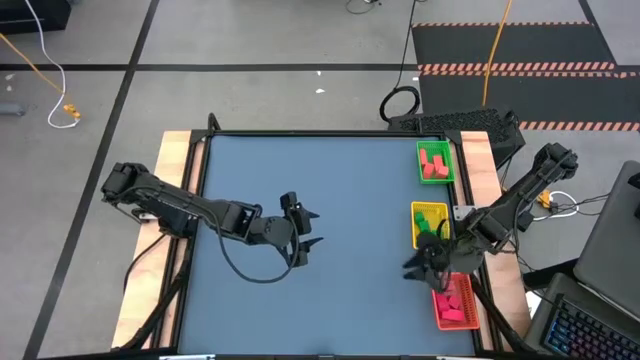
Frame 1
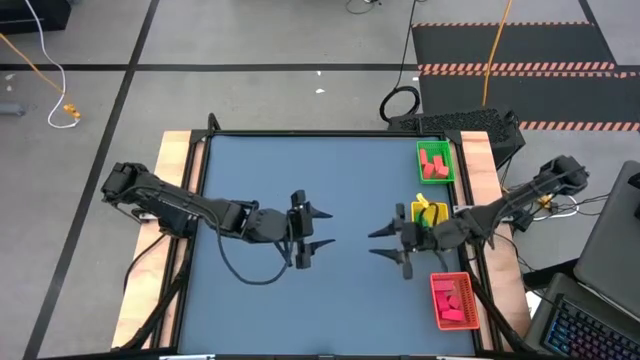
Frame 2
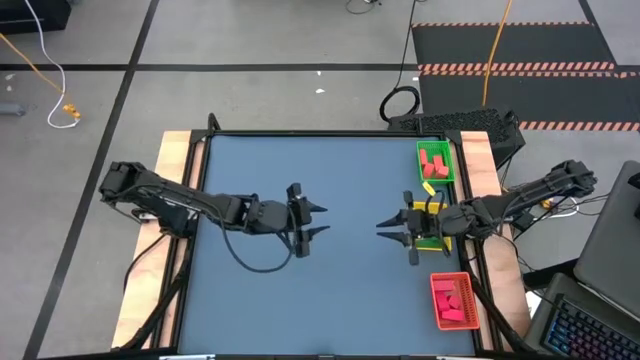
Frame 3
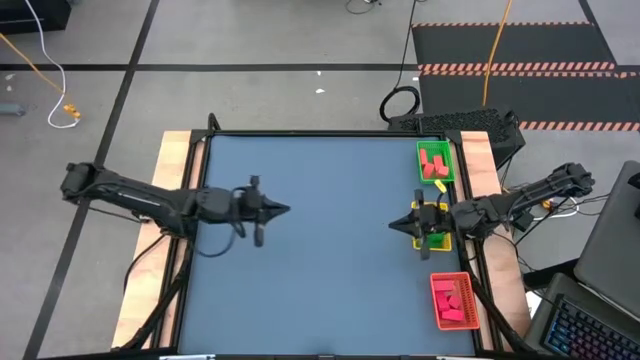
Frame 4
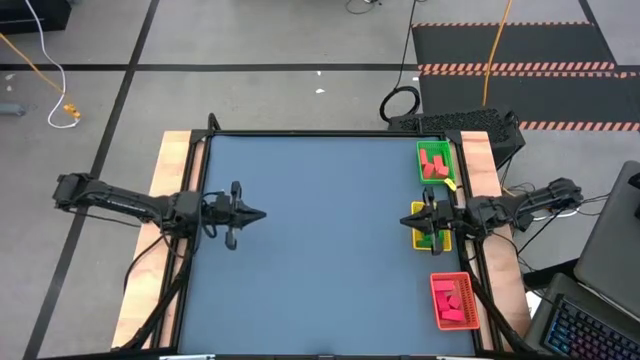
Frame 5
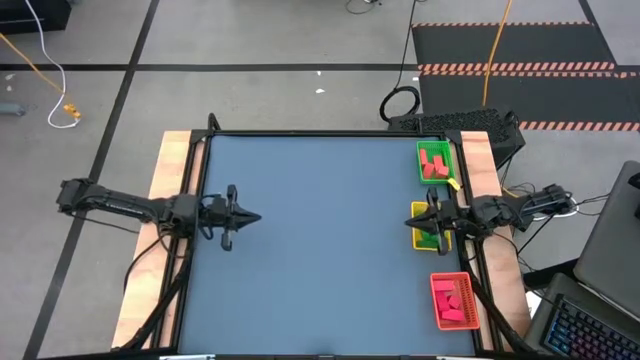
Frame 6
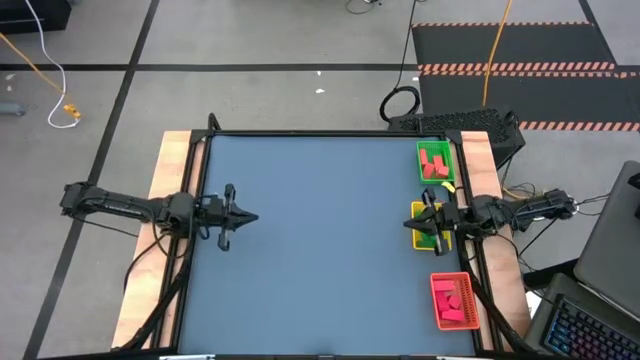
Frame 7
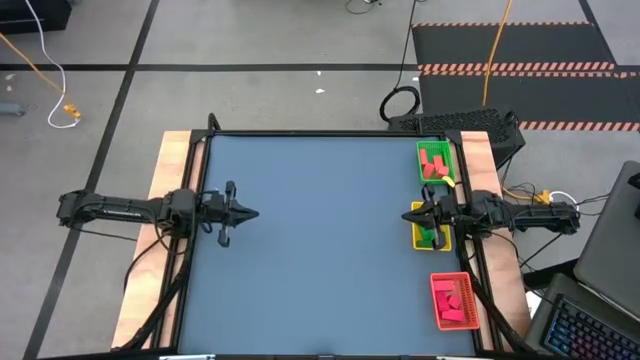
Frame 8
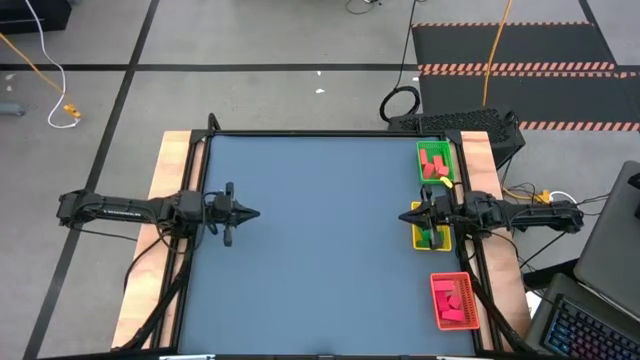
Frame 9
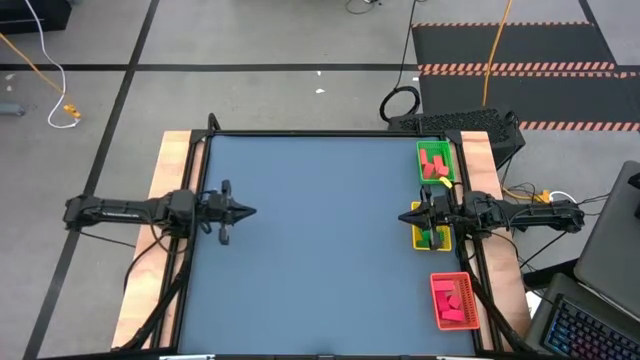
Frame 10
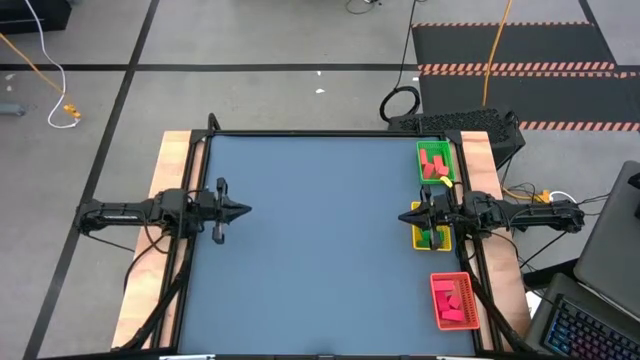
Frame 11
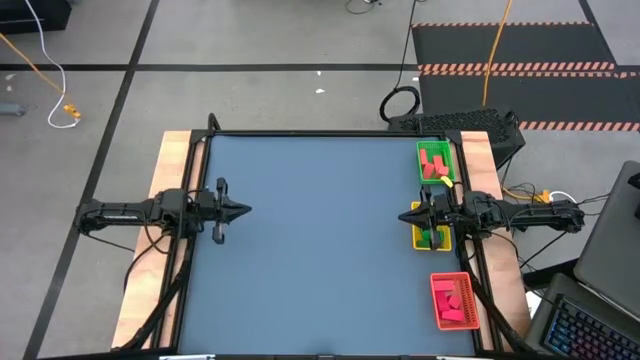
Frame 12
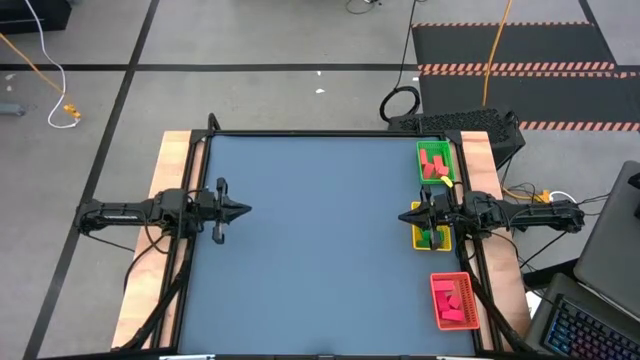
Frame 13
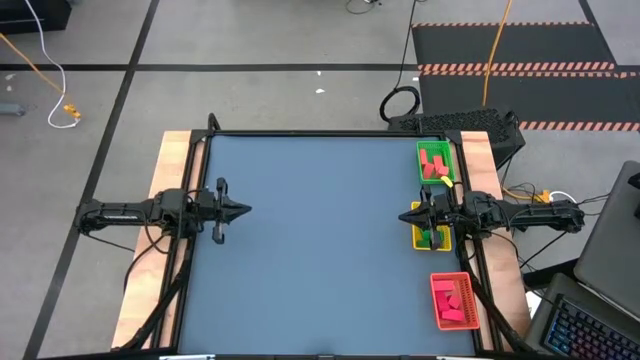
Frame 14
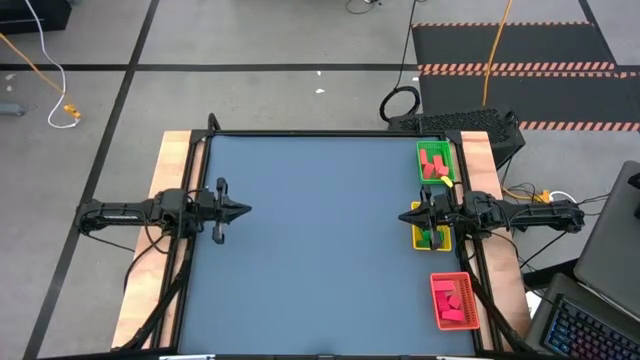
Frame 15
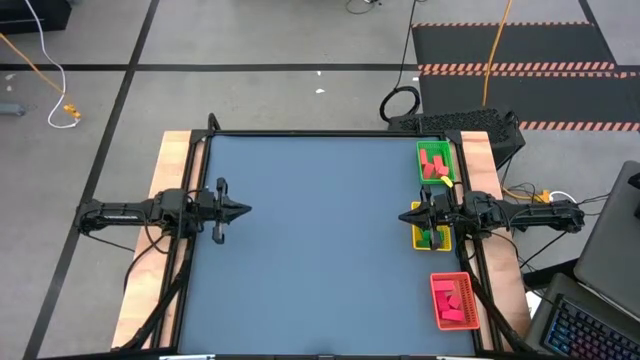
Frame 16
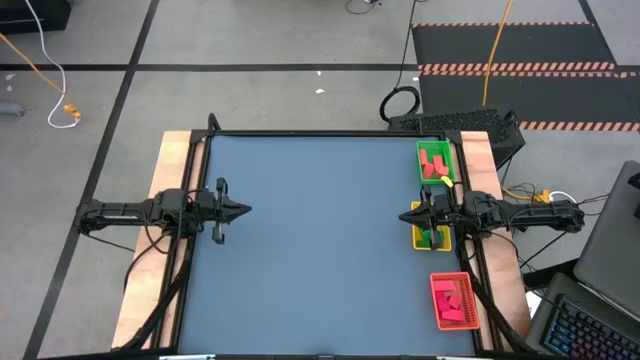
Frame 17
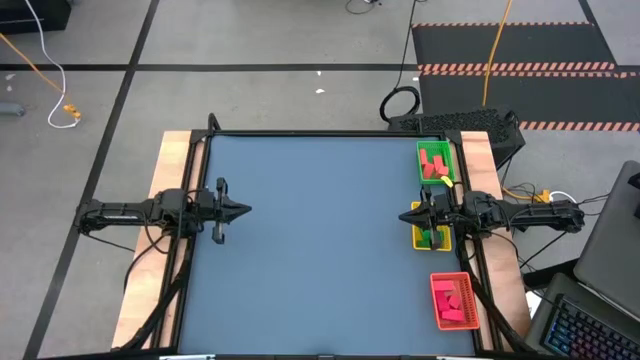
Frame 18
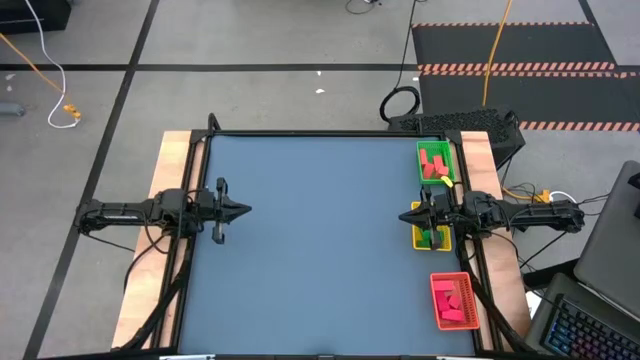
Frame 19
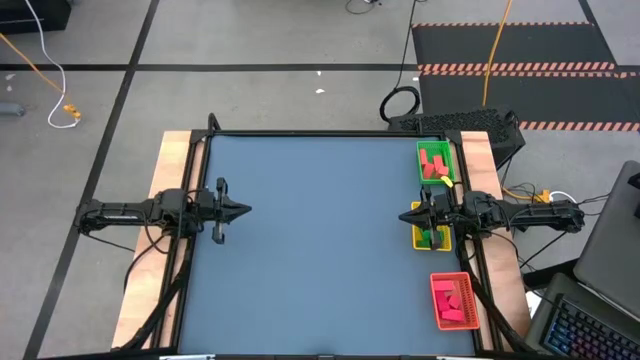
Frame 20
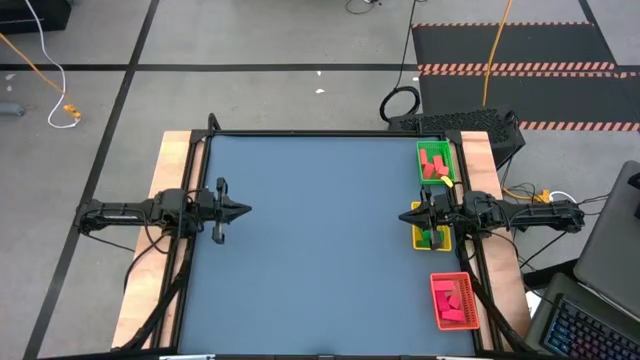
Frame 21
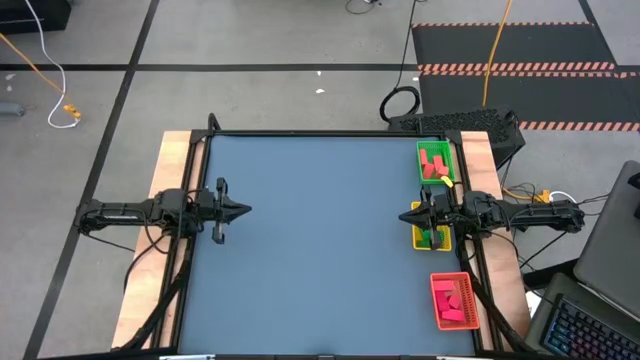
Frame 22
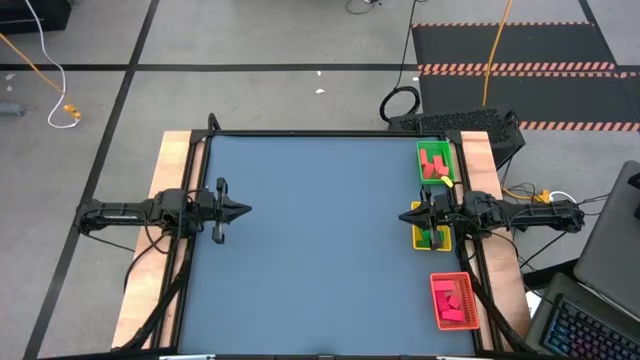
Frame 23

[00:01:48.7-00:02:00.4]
Task: Sort & place blocks by color
Return to Home Position

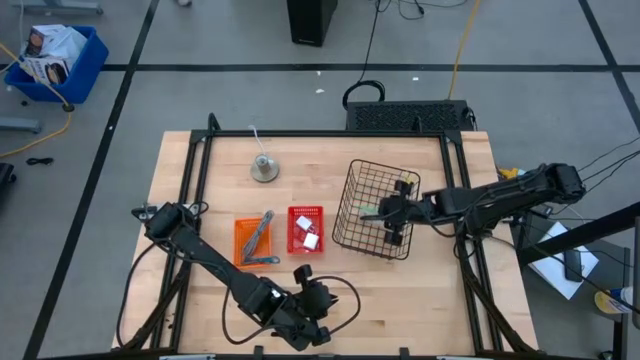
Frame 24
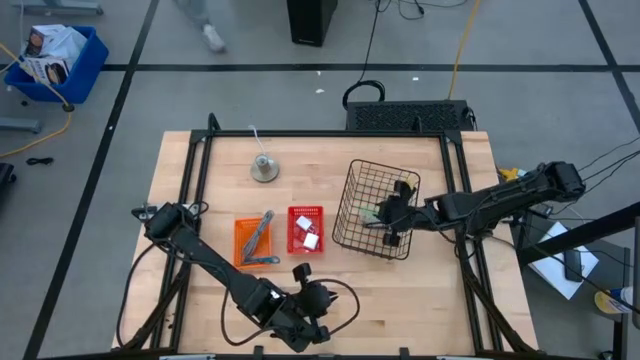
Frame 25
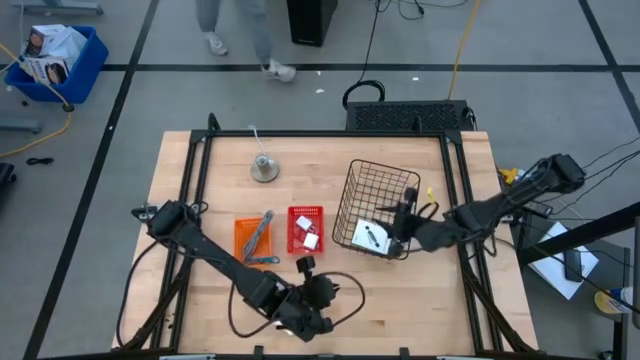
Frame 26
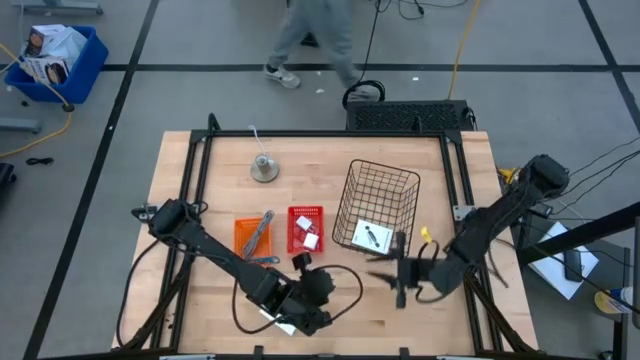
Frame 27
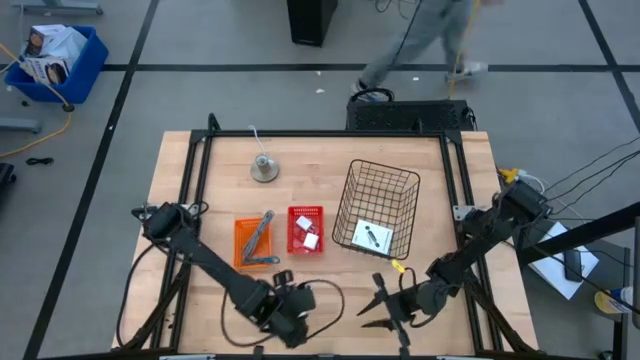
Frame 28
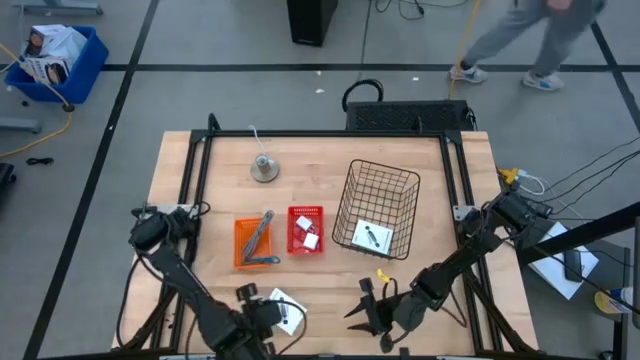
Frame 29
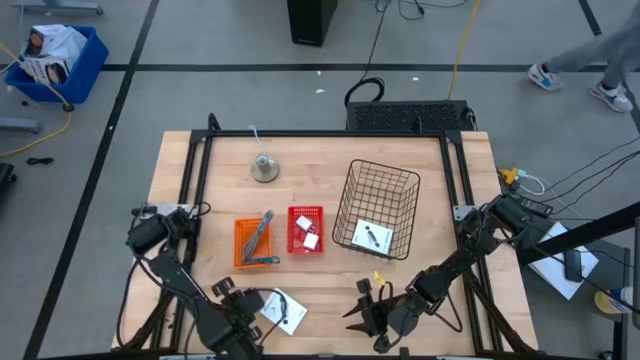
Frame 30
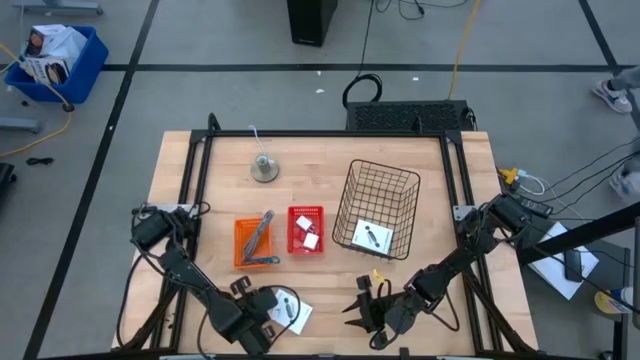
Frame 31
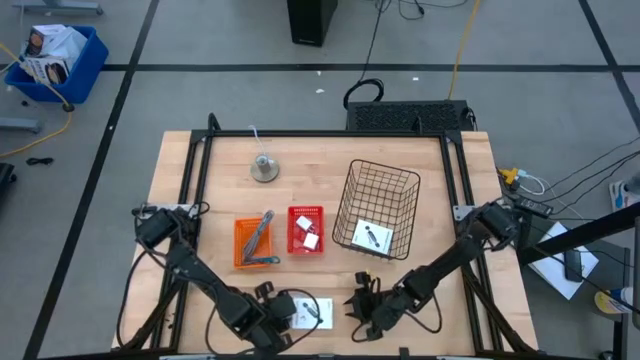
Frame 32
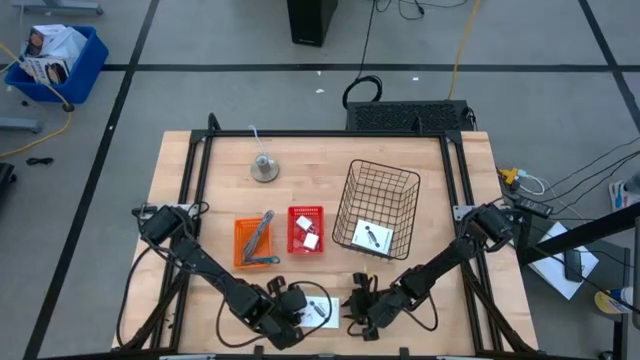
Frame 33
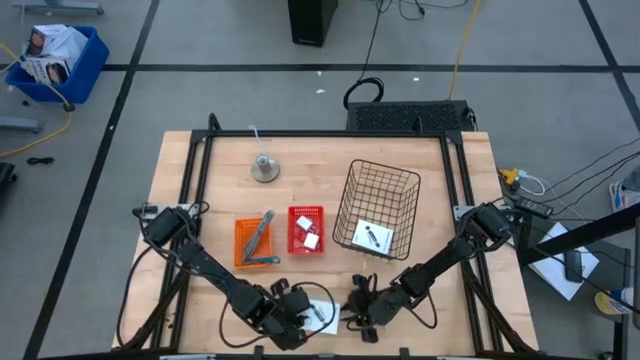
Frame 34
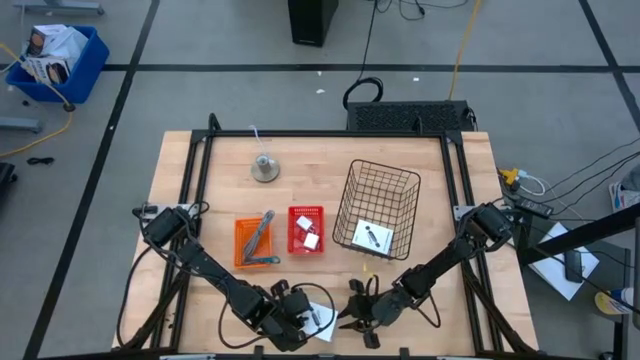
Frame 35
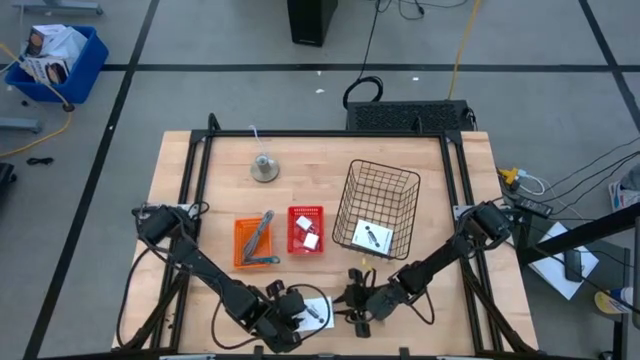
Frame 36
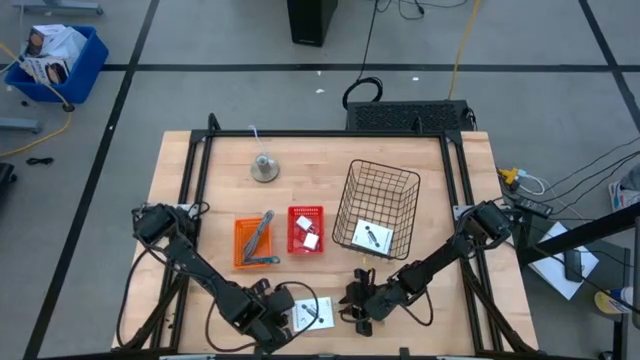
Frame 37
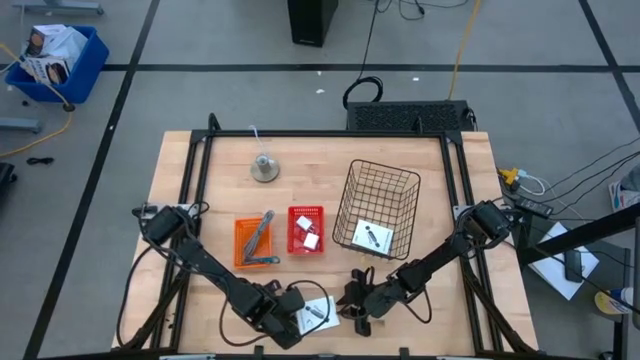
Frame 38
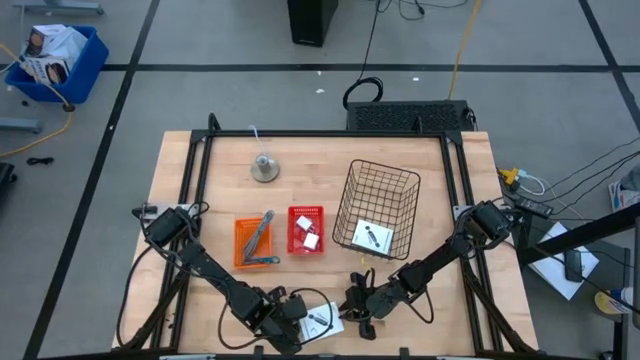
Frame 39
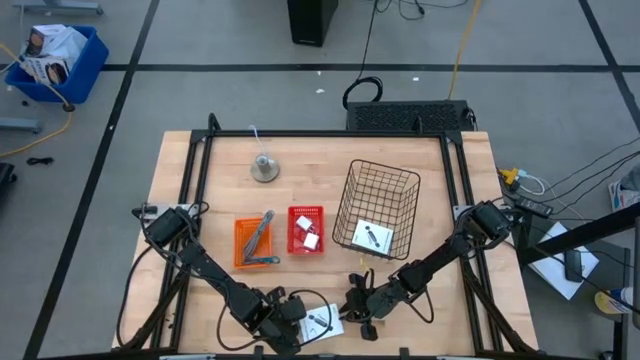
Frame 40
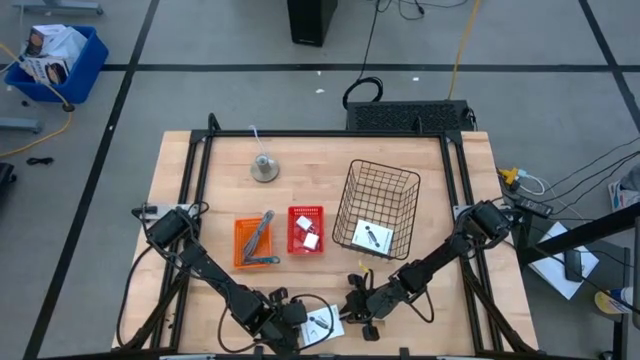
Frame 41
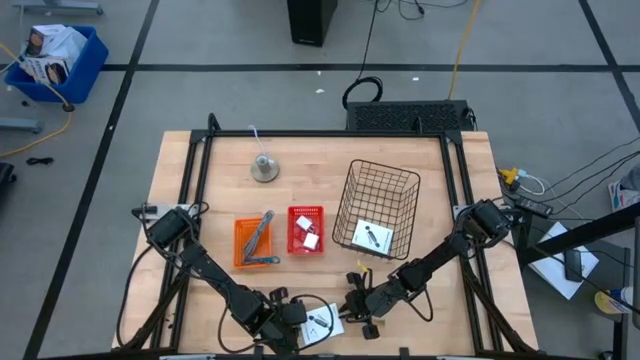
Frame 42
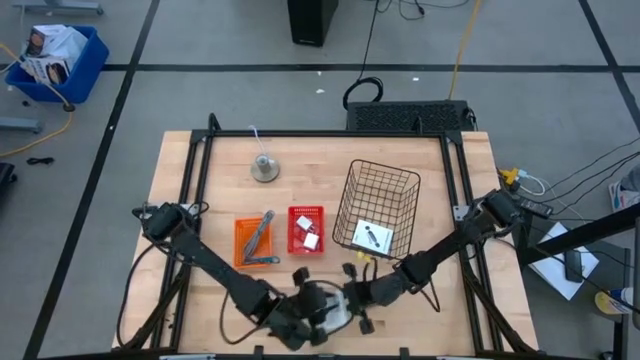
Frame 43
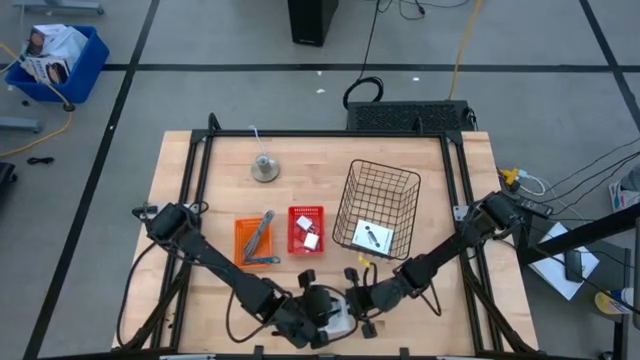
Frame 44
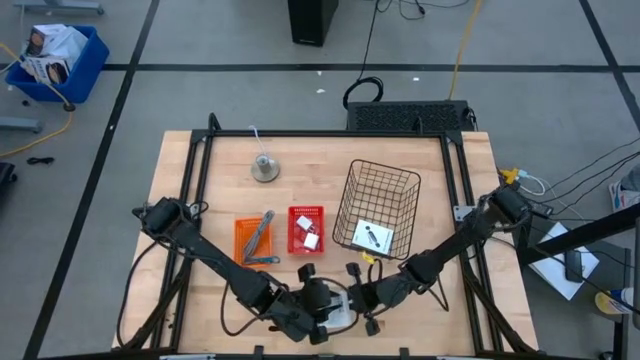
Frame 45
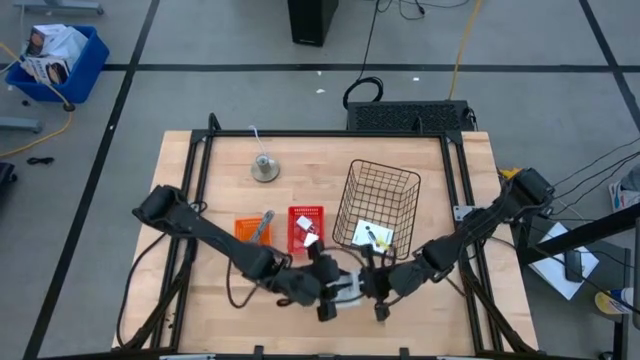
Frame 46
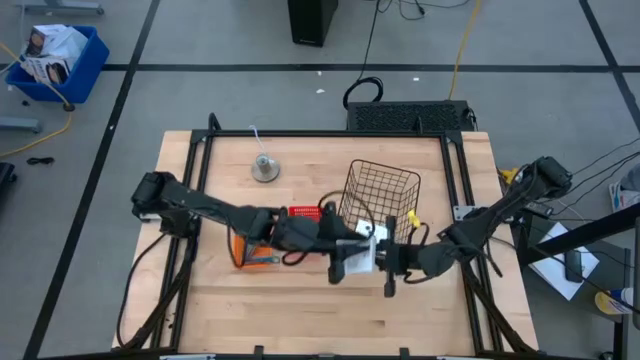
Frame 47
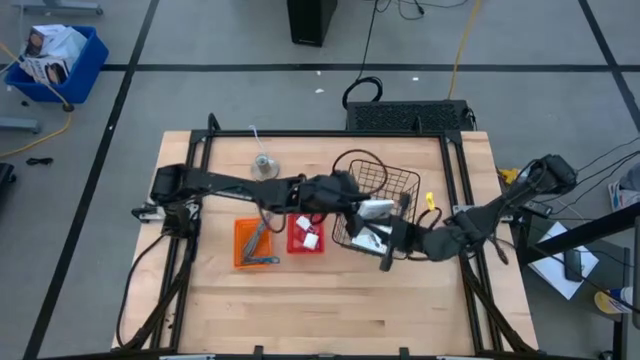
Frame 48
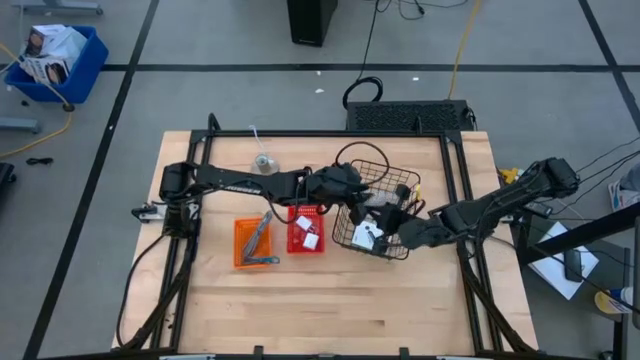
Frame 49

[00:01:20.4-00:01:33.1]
Task: Pick and place items into bin
Put the card reader into the basket
